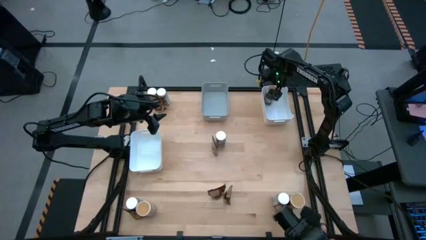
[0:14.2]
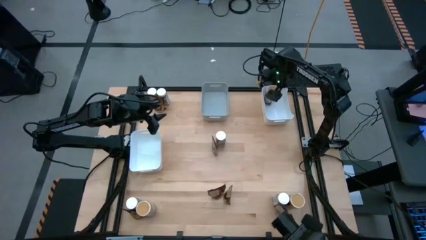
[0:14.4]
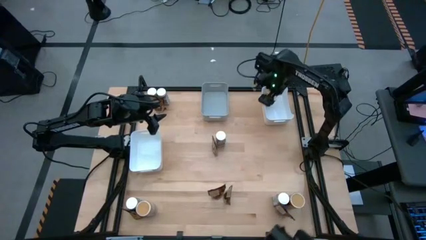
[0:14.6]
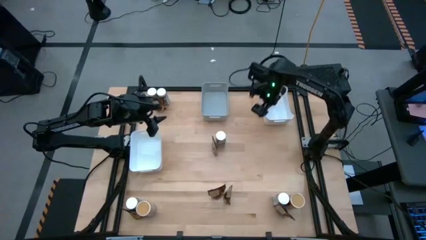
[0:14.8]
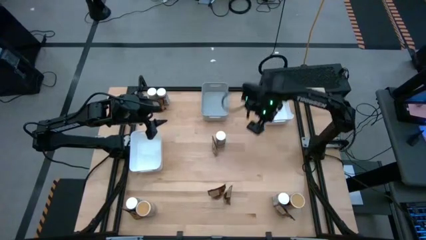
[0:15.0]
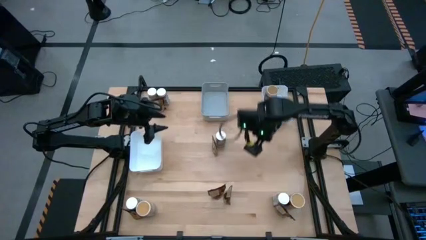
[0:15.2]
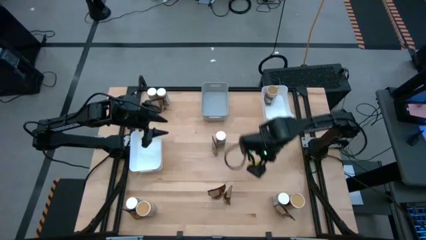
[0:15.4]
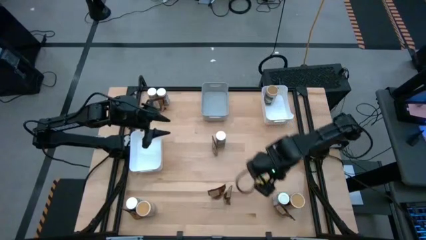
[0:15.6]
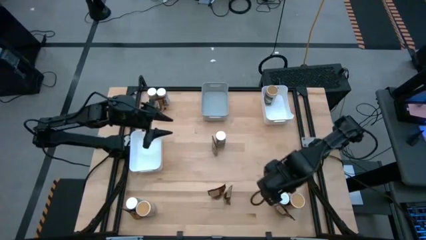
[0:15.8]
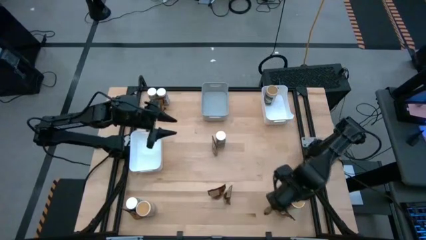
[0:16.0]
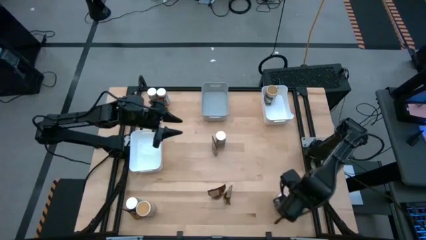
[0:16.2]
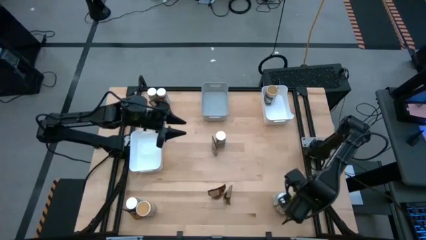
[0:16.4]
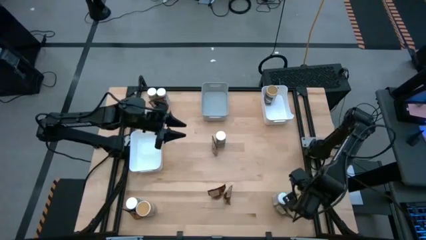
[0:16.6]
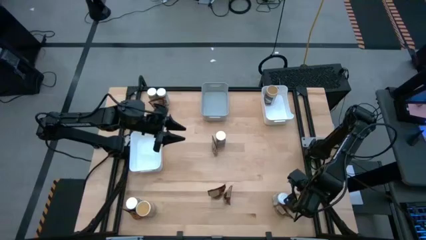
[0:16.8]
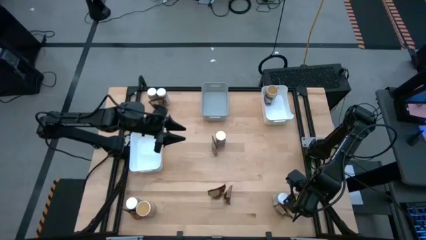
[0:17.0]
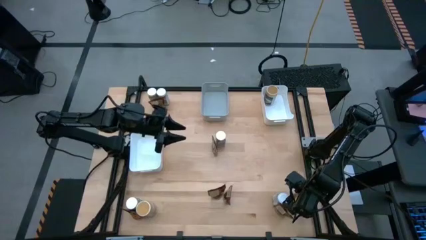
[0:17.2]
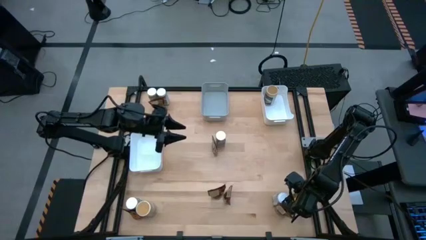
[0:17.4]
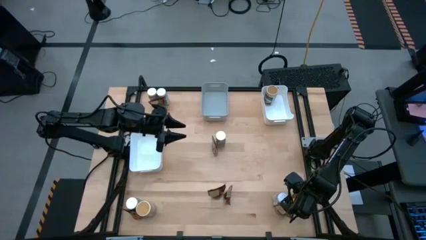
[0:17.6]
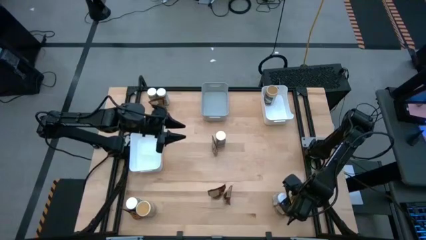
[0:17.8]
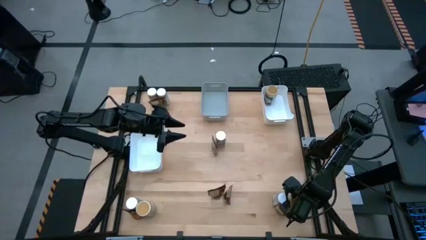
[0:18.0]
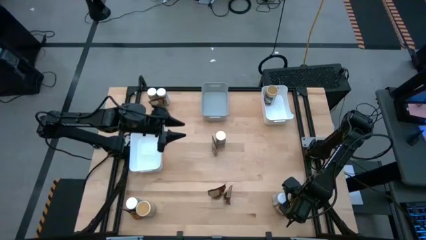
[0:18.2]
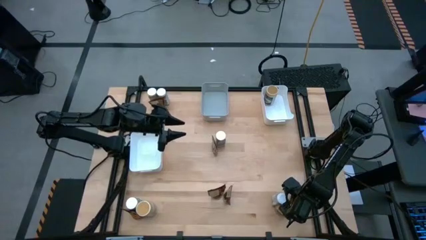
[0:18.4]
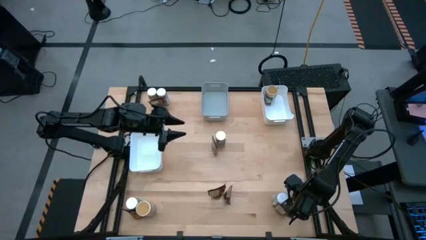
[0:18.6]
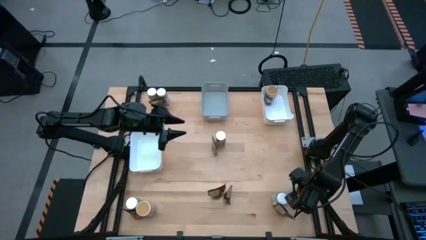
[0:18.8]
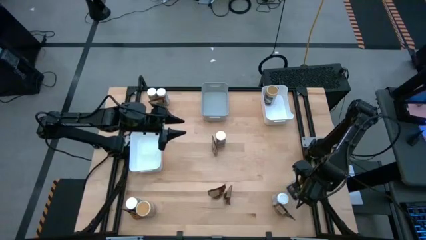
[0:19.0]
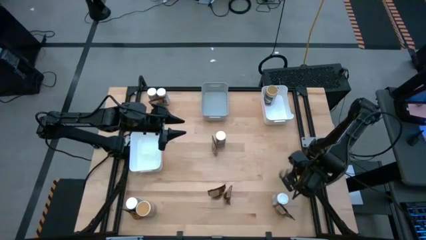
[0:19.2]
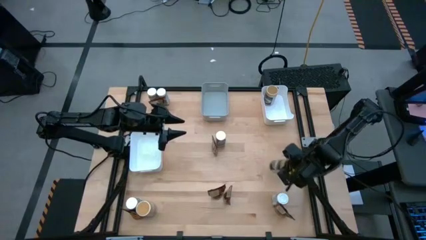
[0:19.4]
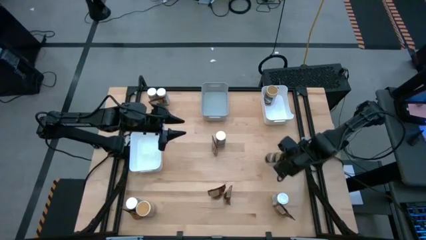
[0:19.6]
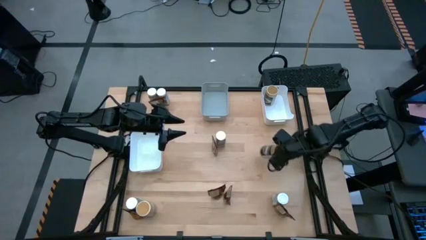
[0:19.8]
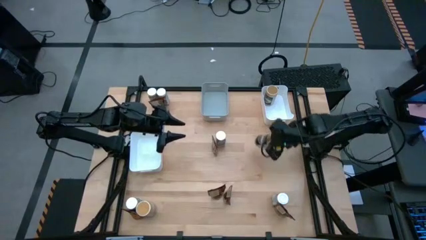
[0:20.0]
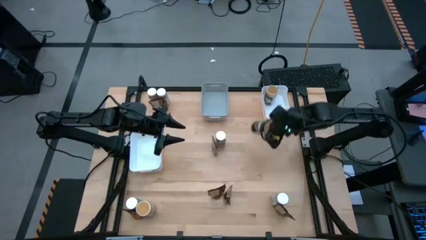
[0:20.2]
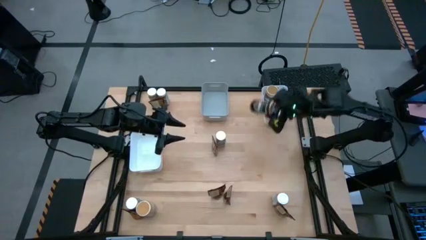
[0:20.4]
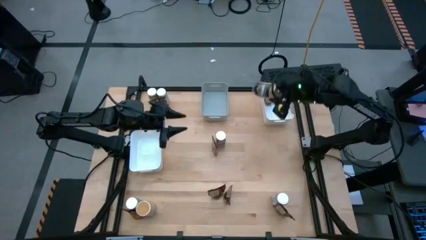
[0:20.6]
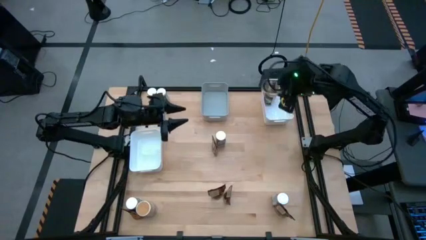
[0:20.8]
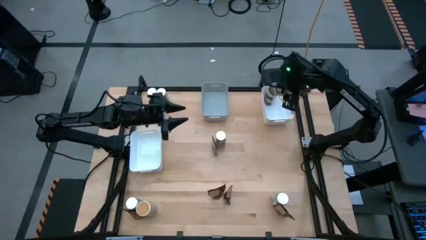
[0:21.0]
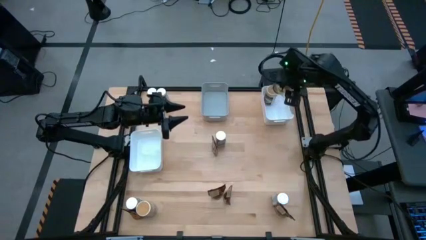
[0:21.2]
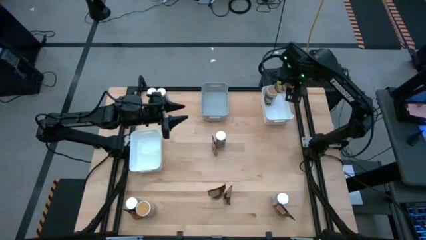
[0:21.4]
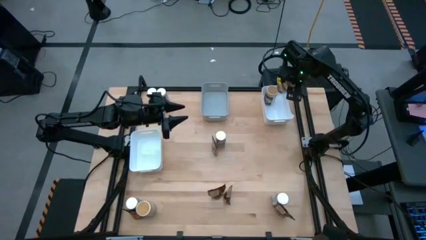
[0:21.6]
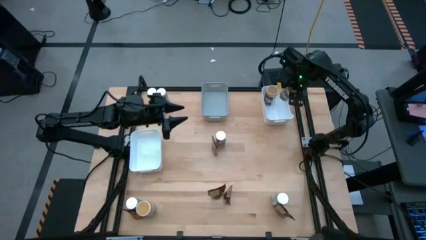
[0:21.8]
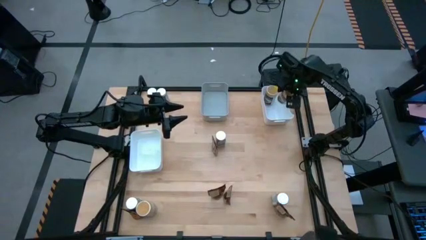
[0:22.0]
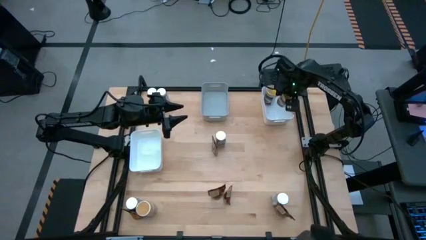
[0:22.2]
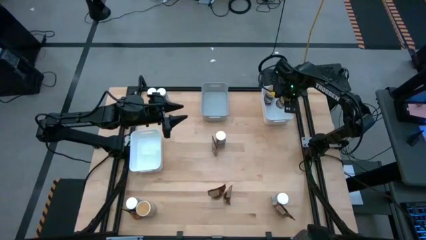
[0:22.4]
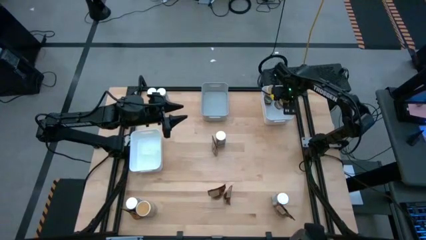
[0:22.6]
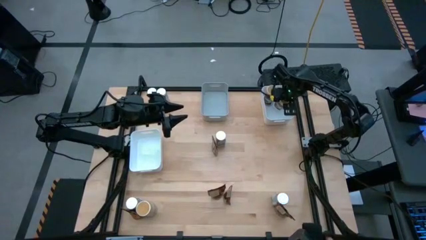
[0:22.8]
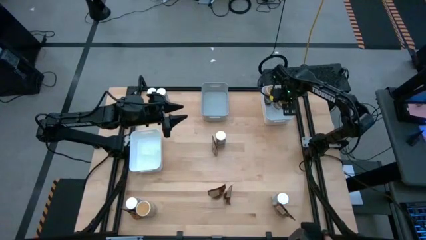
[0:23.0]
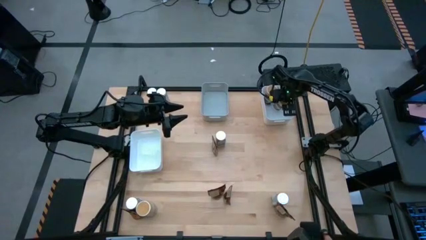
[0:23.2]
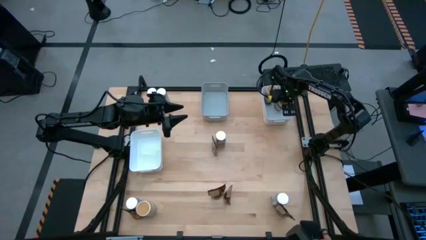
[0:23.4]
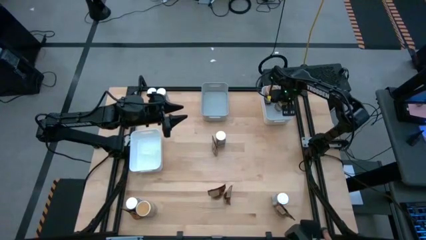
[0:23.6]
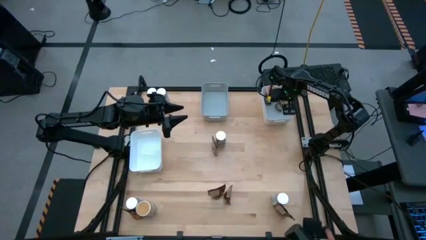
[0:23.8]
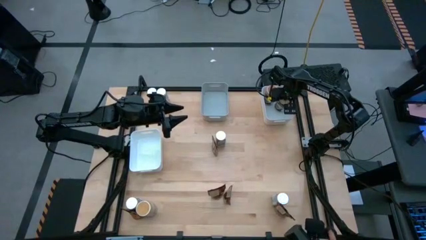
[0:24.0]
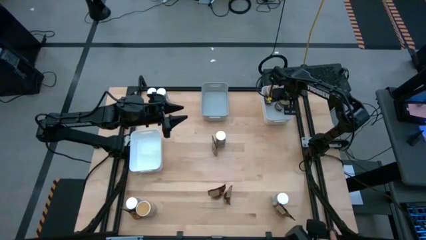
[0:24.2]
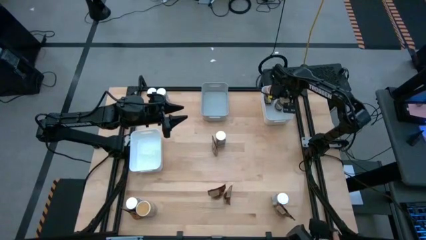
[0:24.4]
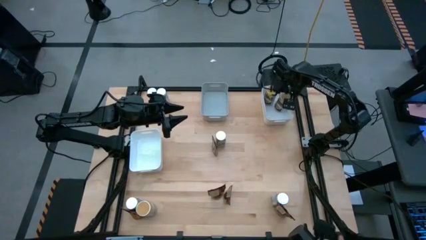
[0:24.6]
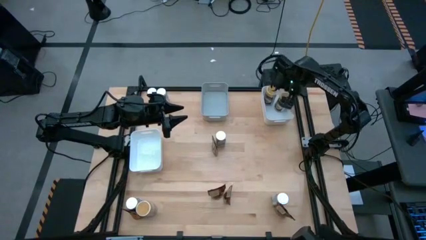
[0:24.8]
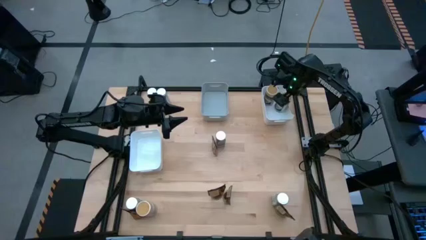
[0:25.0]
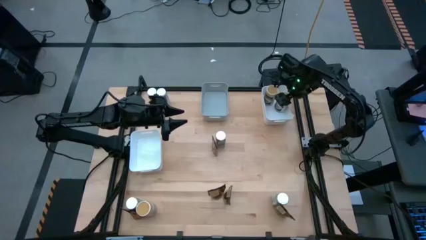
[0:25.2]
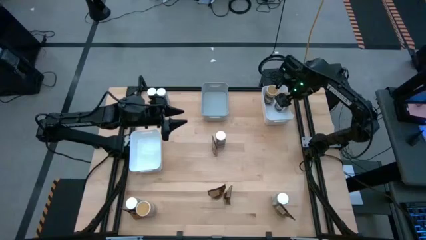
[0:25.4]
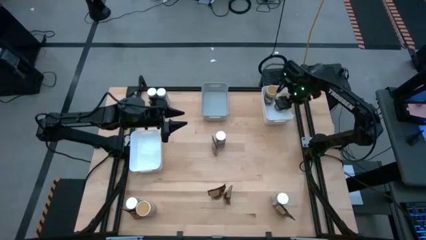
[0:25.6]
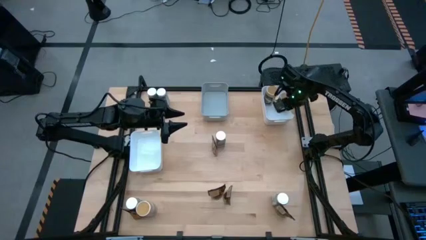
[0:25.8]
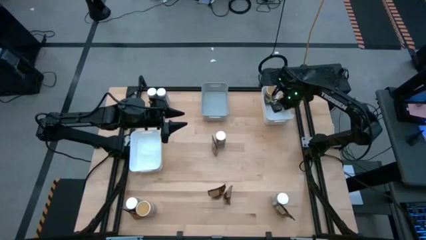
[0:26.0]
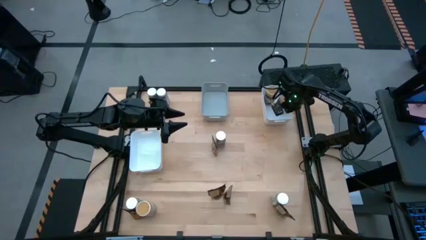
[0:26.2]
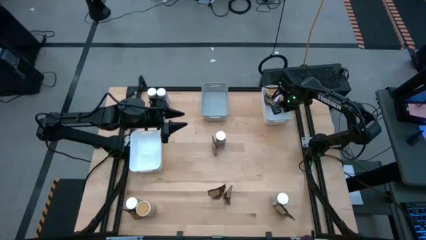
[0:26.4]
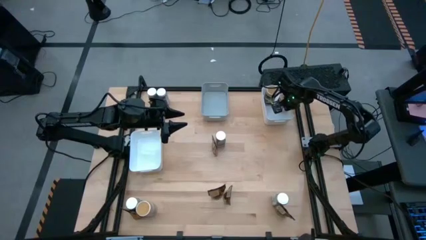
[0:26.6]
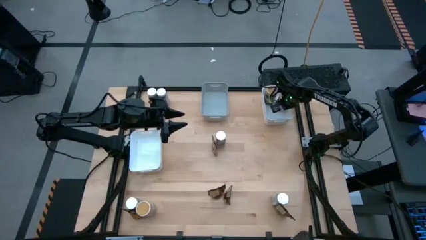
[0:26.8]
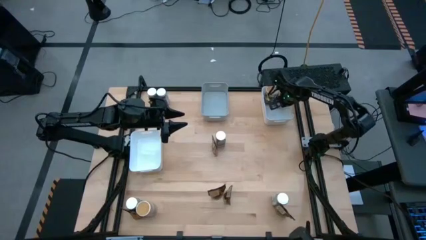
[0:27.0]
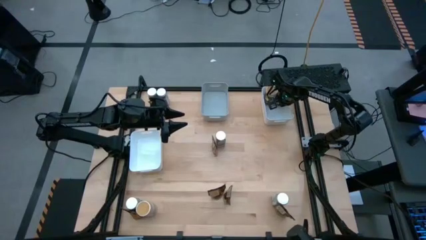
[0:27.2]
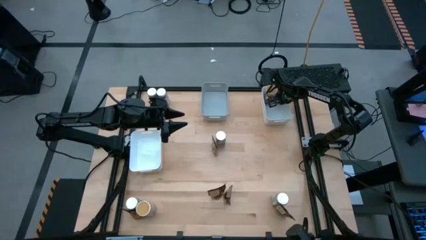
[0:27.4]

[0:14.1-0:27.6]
Task: Sort spices by type
Put the right gold spice bottle into the top white bin
